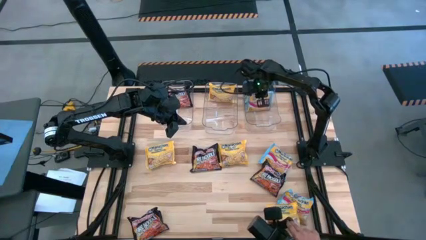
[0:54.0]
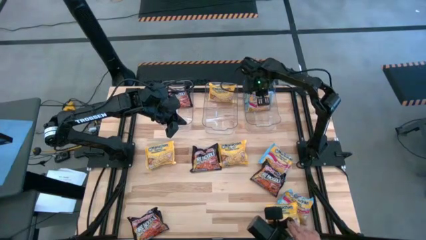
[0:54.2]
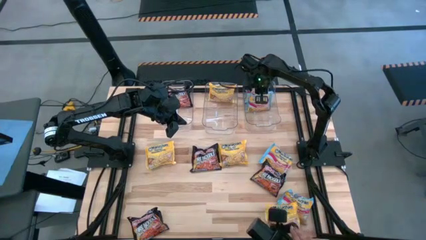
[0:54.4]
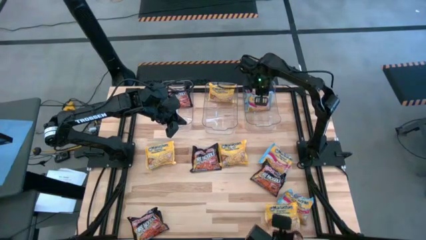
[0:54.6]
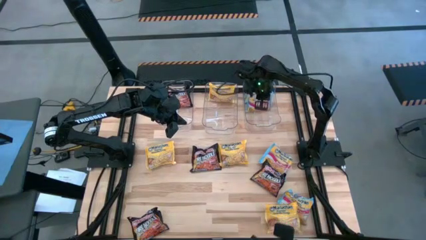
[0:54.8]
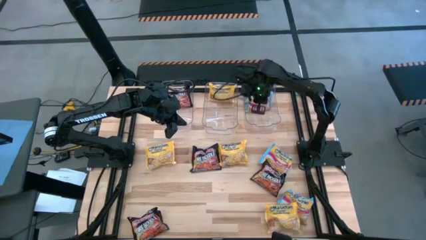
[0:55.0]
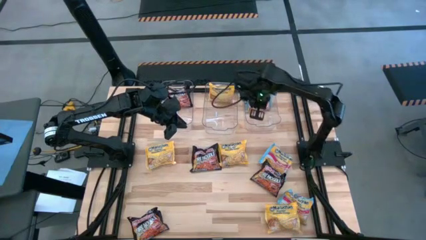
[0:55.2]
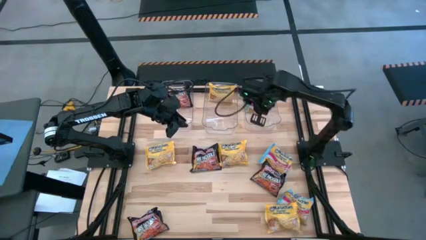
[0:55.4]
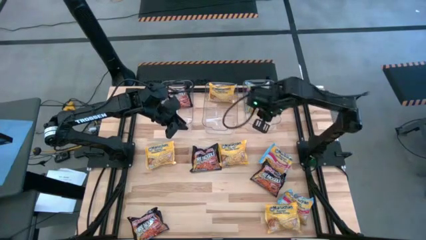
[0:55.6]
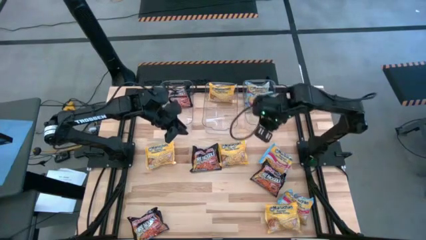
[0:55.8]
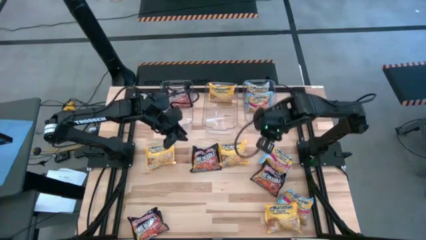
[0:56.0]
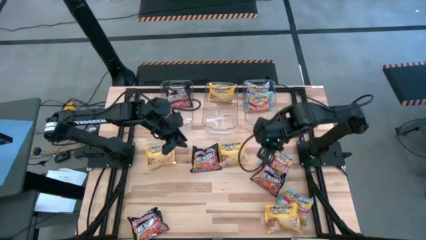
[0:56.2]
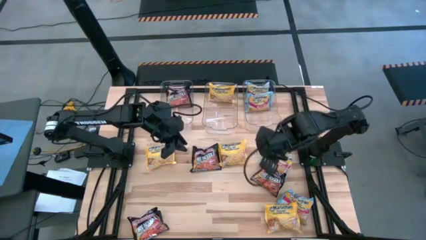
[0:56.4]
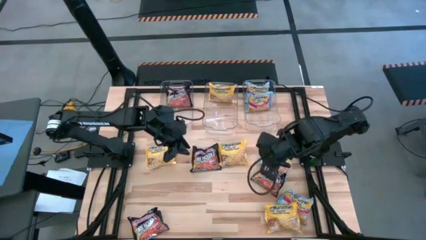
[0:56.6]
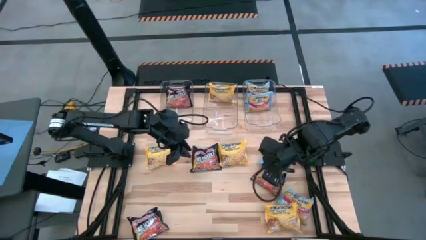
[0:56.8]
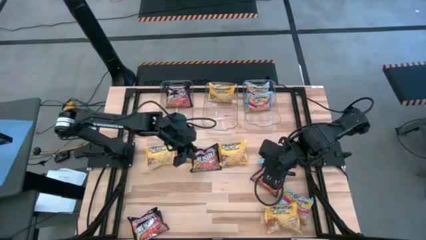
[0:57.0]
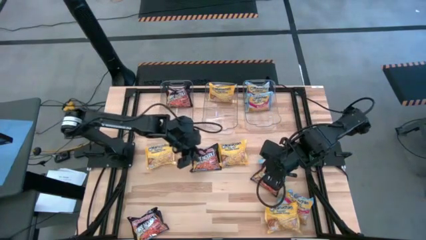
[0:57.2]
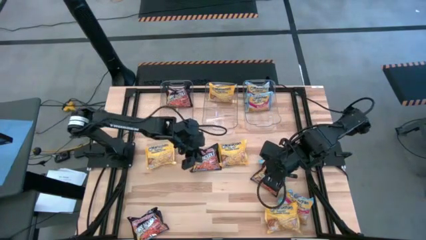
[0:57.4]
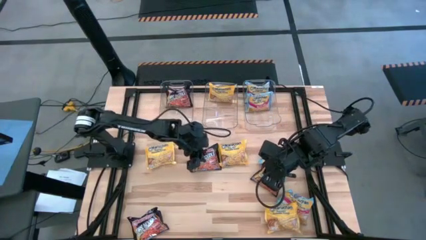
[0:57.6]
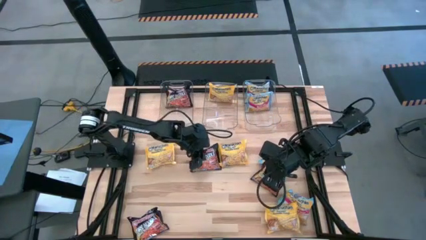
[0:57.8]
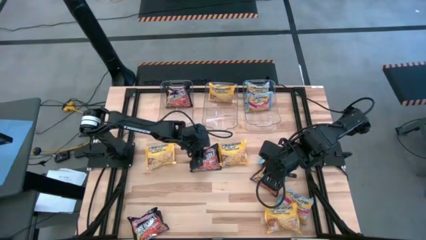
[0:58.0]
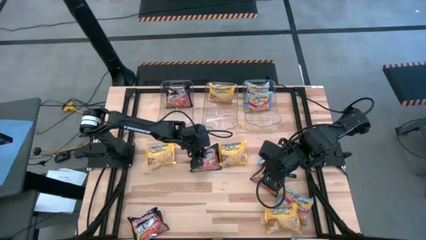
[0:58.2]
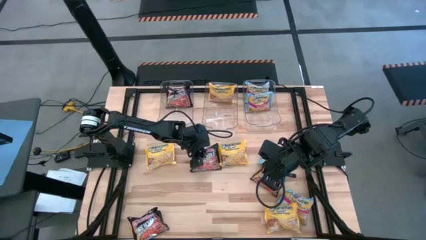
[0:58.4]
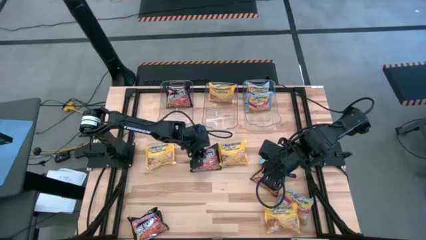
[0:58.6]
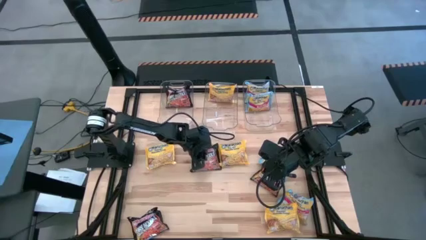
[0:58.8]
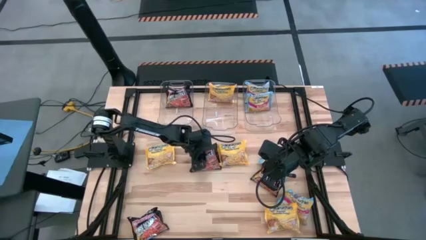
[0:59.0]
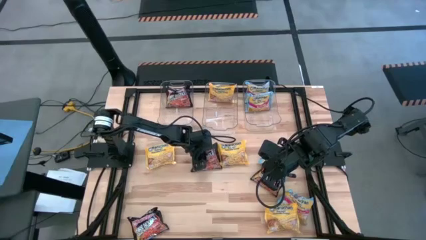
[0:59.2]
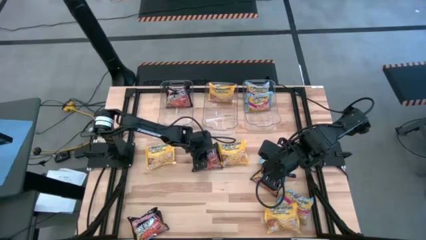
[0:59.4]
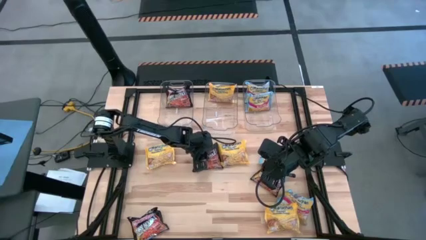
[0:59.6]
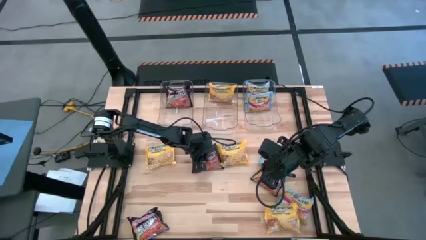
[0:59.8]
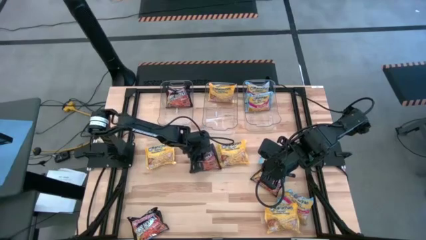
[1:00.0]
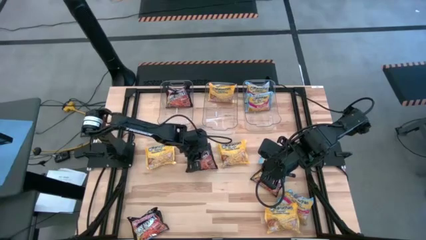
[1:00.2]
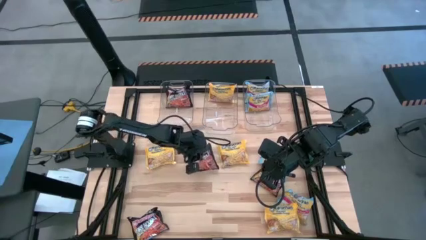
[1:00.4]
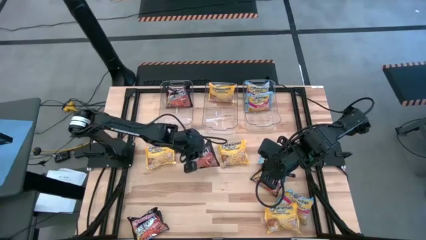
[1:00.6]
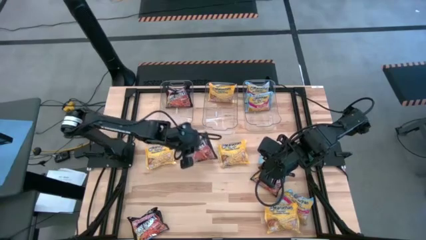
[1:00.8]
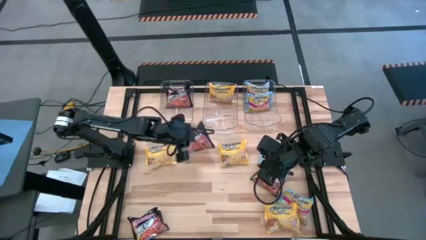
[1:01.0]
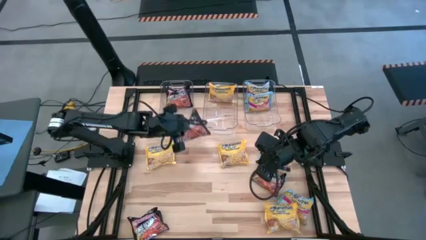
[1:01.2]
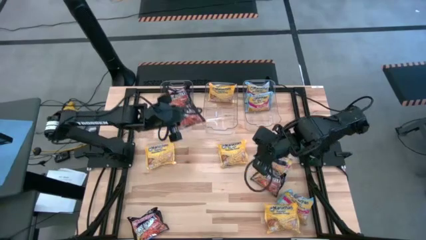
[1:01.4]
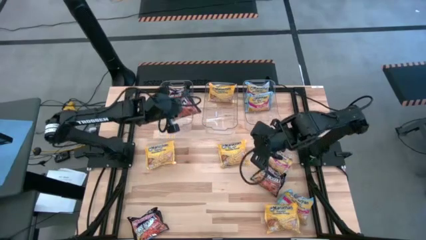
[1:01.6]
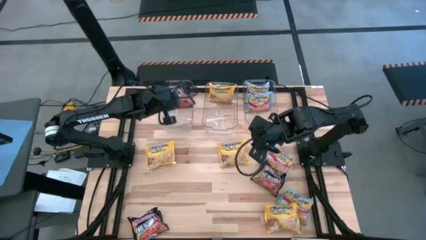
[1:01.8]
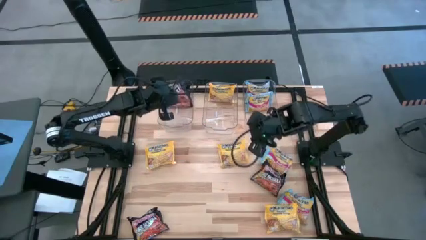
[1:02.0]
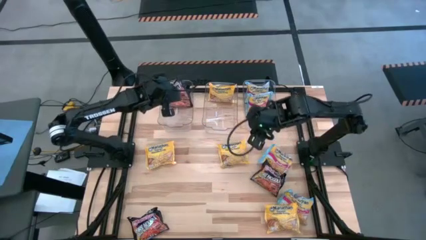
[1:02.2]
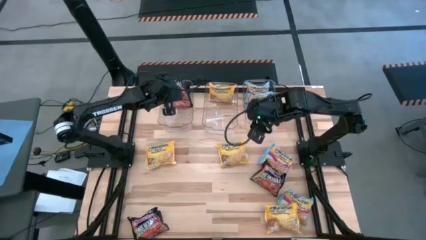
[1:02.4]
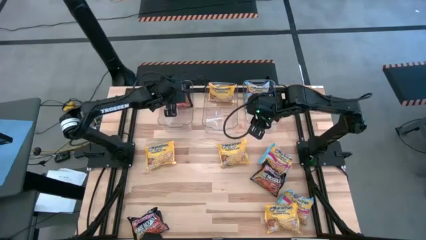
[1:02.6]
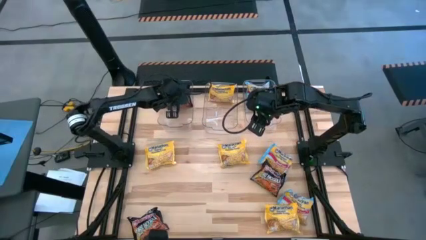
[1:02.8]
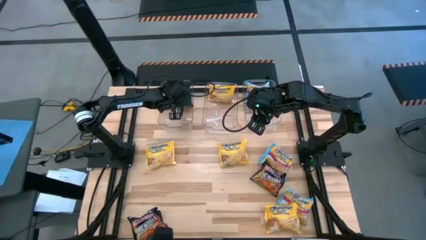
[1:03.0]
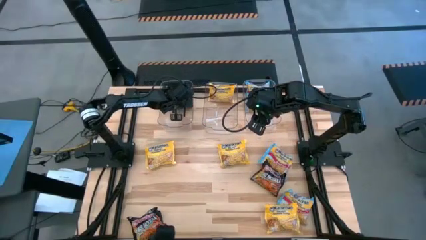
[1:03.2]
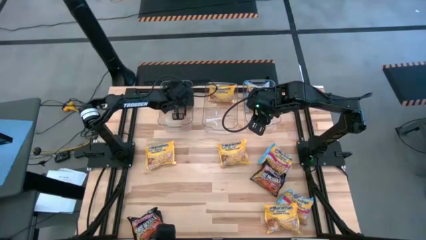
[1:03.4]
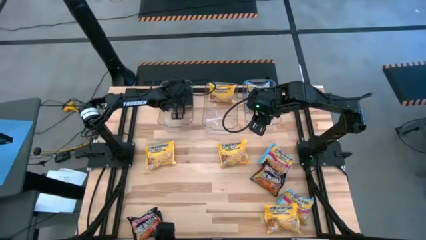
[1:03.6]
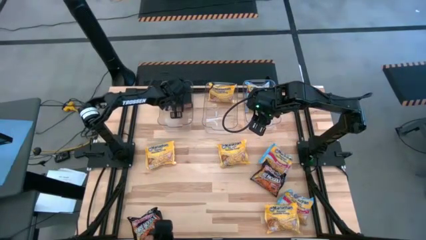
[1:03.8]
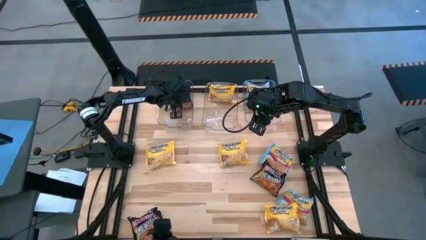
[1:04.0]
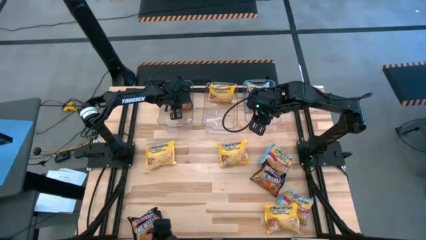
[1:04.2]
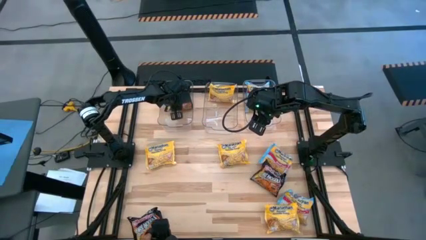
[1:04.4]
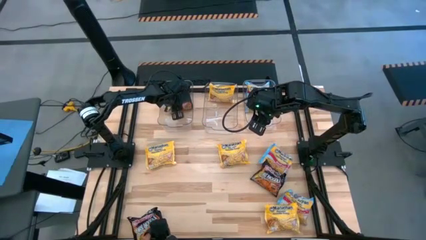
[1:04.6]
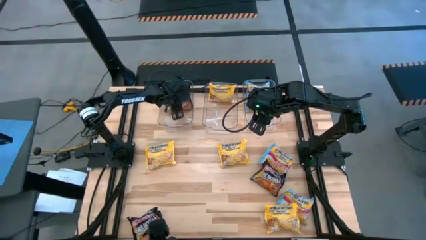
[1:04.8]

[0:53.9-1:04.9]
Task: Sort Maruchan noodles
Put the black noodle pack into the left transparent bin

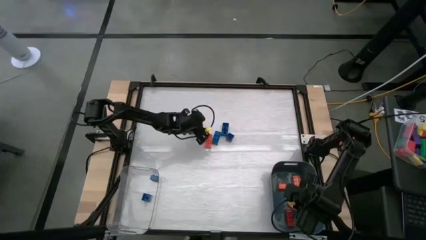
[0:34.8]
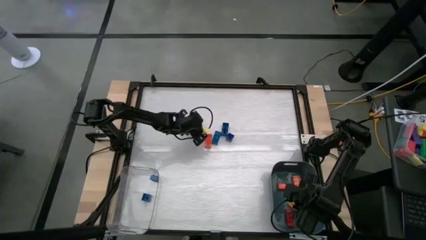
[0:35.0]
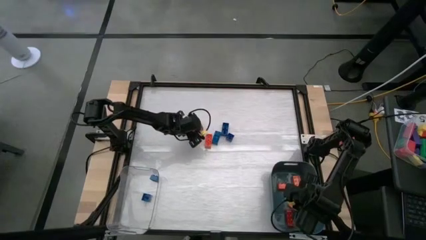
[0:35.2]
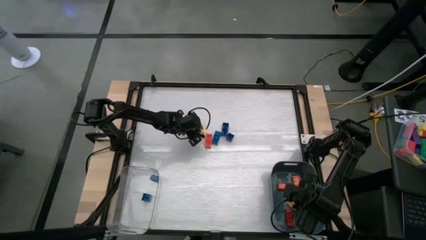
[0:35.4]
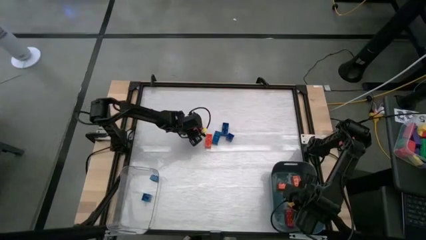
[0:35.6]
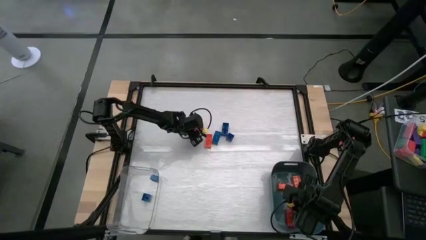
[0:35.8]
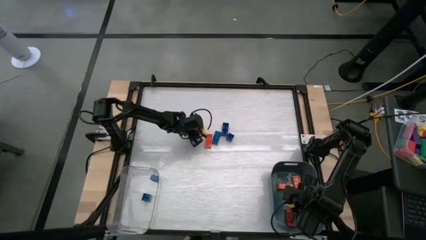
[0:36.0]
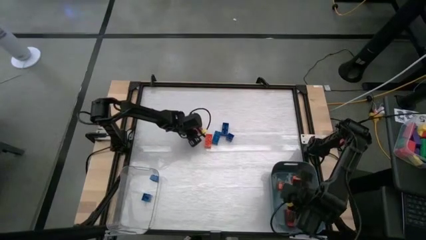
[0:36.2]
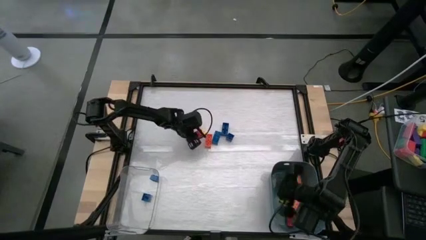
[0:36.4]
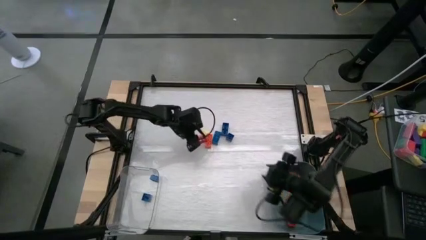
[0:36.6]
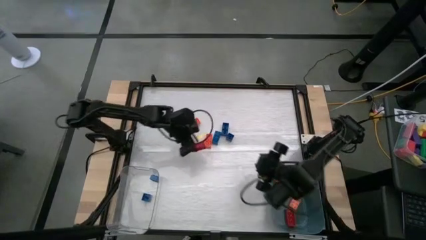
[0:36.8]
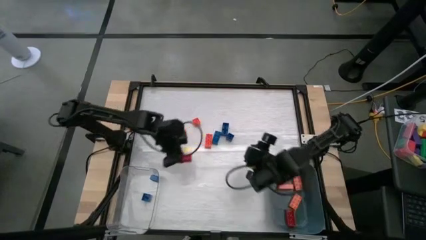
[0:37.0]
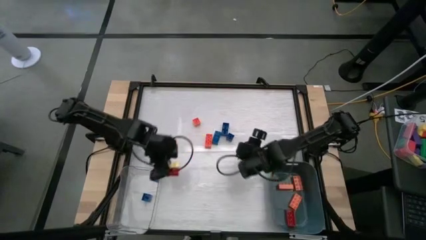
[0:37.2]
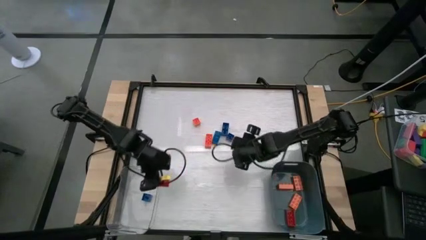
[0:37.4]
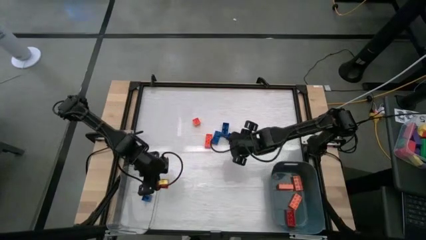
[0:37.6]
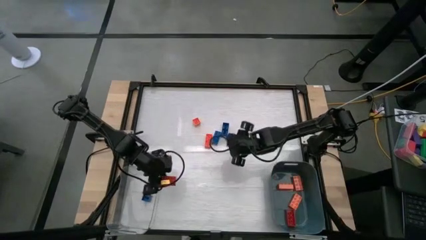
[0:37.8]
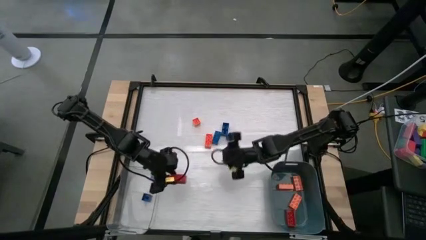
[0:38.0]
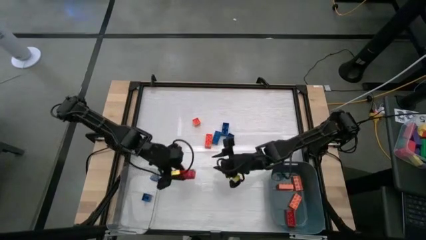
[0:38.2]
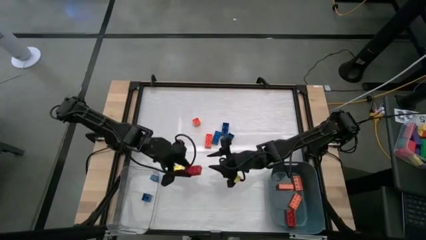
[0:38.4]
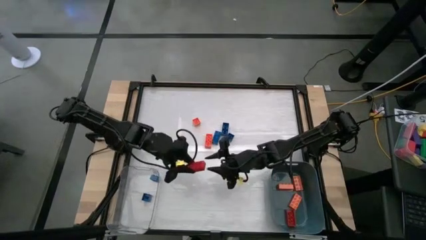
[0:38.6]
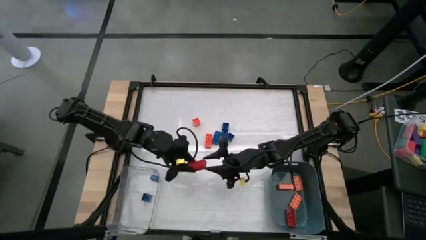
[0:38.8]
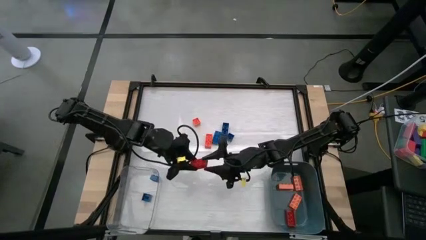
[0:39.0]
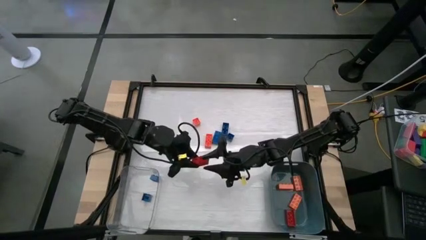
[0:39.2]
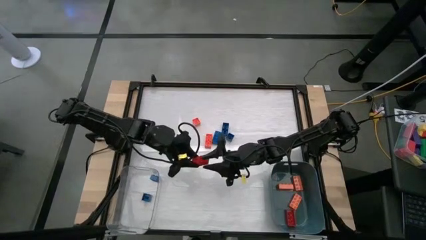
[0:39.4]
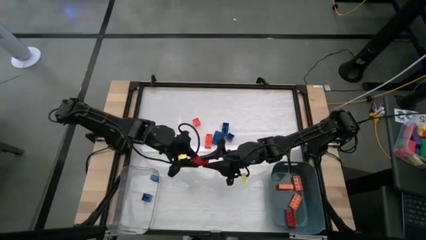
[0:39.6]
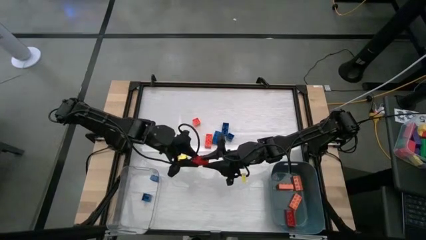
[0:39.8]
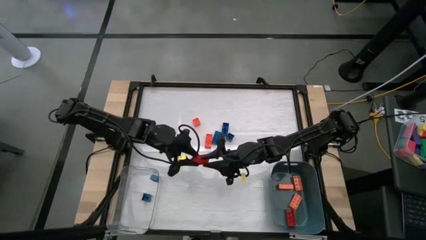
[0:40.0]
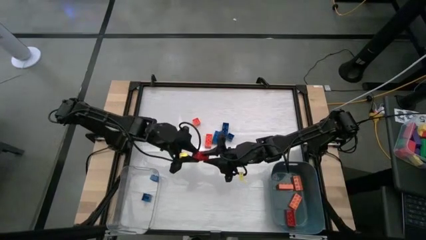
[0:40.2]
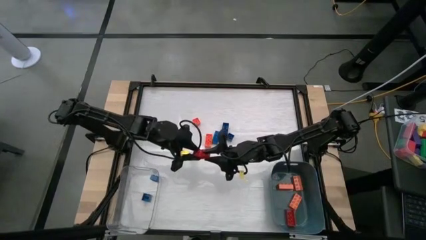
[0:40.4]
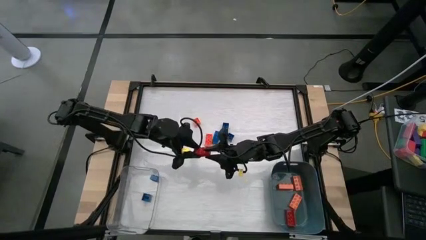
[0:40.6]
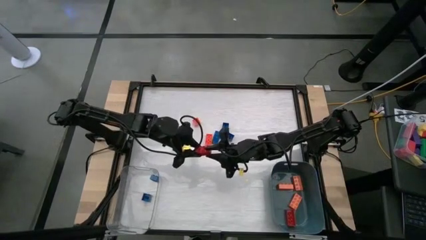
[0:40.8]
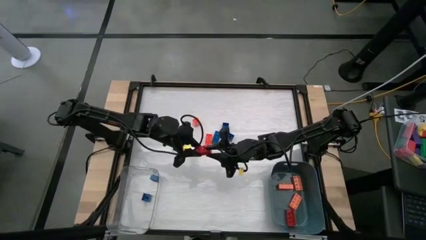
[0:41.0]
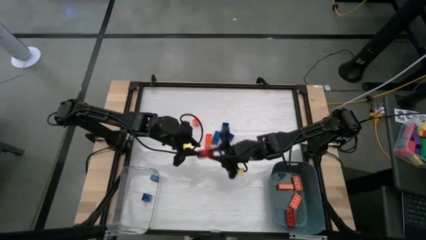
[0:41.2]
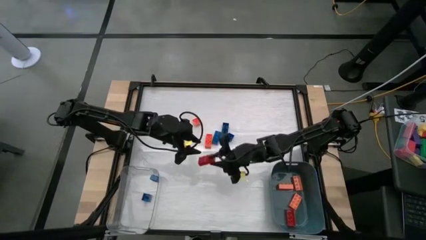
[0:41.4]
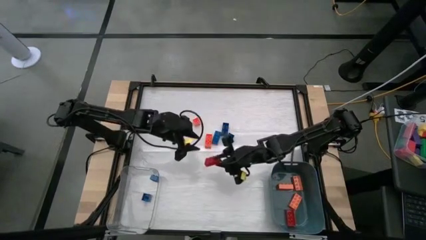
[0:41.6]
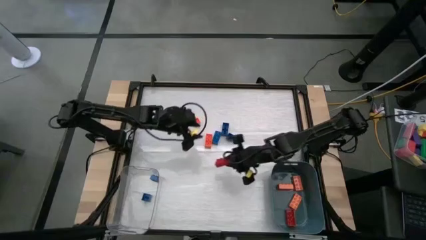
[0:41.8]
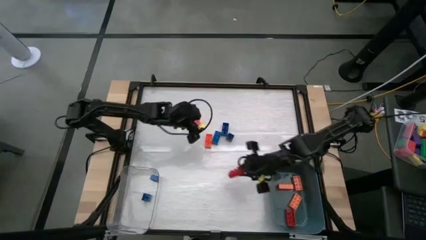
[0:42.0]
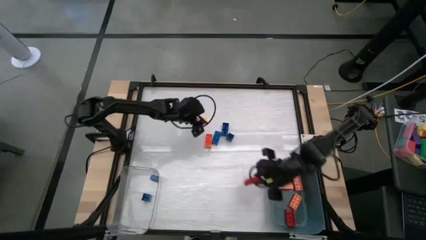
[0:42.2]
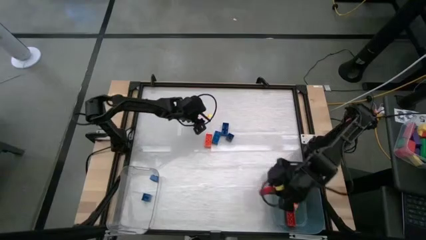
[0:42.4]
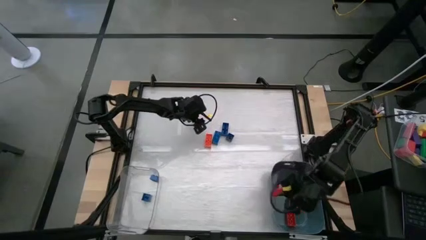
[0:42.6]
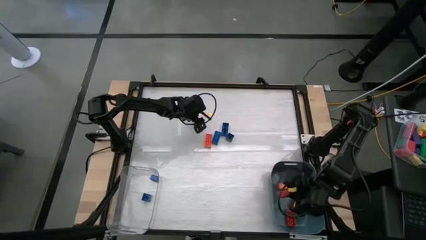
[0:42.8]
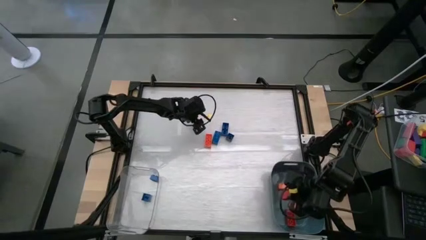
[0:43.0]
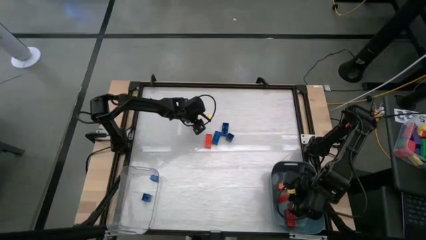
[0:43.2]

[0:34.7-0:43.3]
Task: Sort blocks by size
Put the large red game piece into the blue bin
